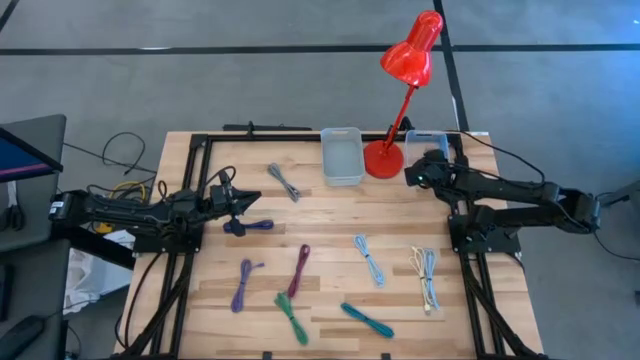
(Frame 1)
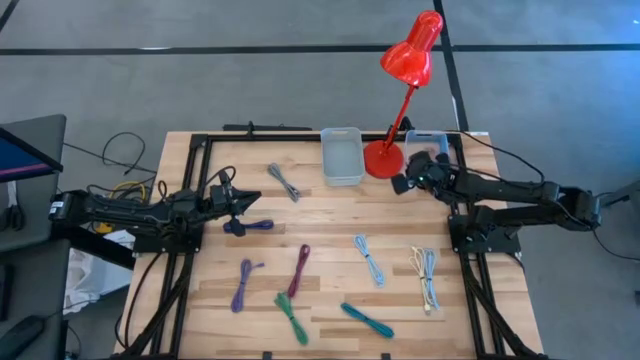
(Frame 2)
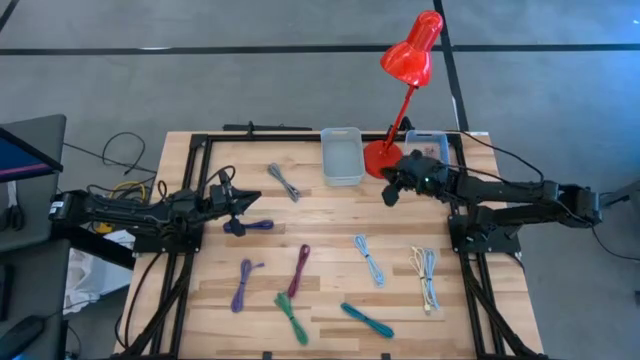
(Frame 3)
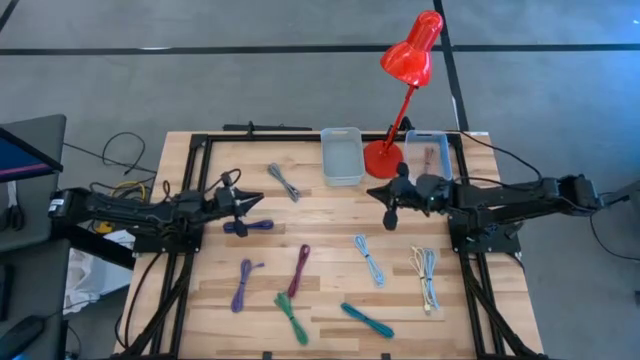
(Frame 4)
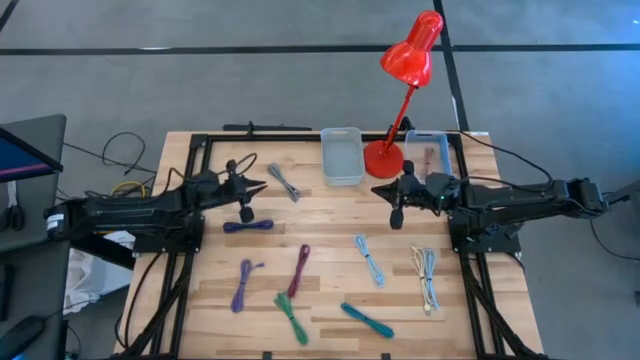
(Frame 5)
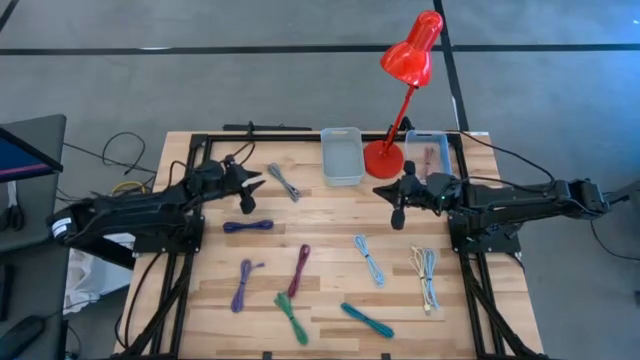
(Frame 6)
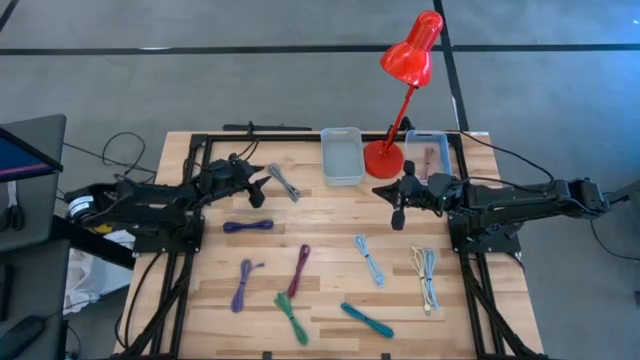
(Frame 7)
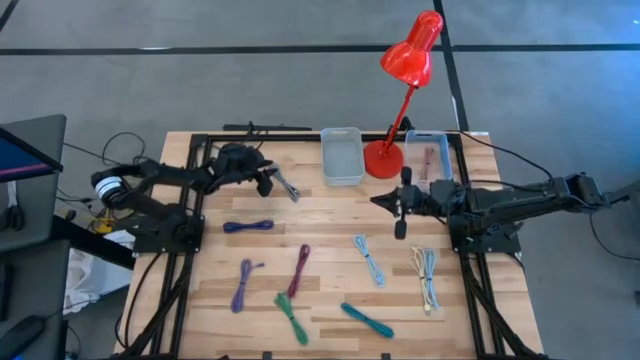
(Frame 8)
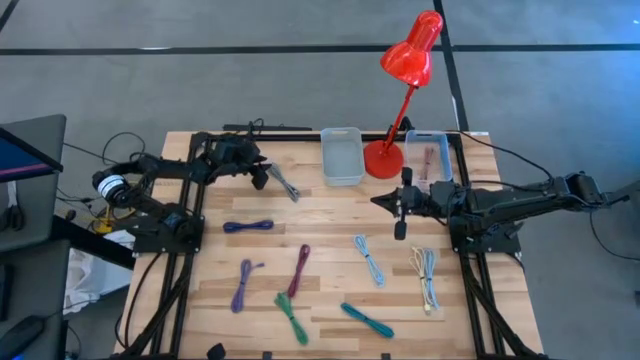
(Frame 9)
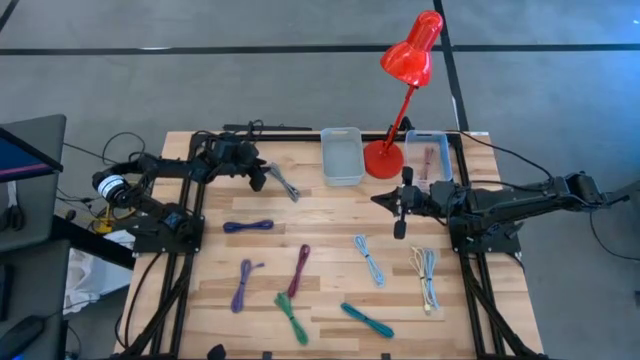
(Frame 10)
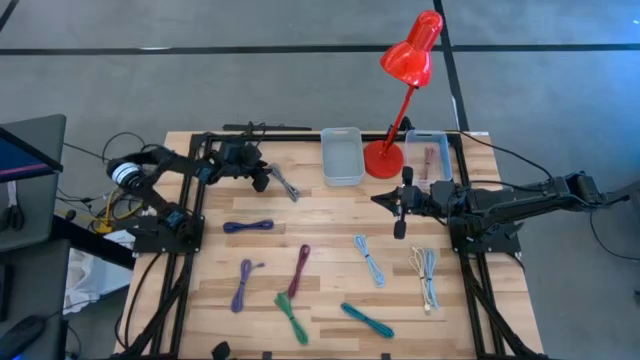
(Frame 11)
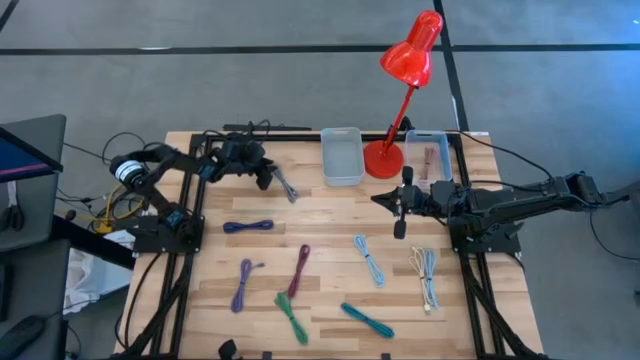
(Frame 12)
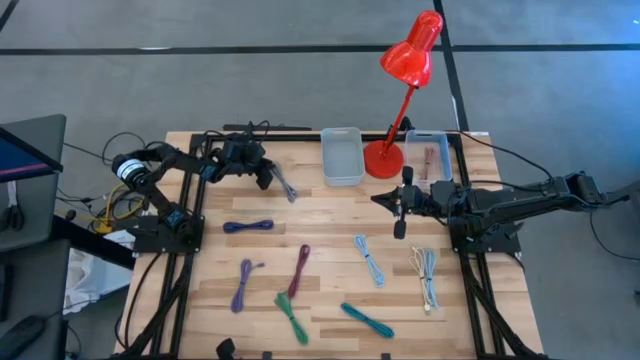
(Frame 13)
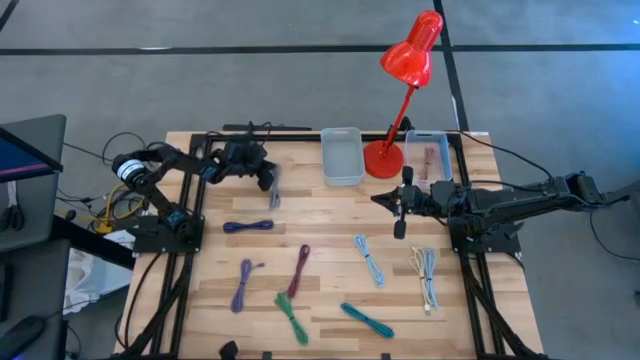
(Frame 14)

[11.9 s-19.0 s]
Task: Pick & Place USB Port
Put the white patterned charger cable into the white bin

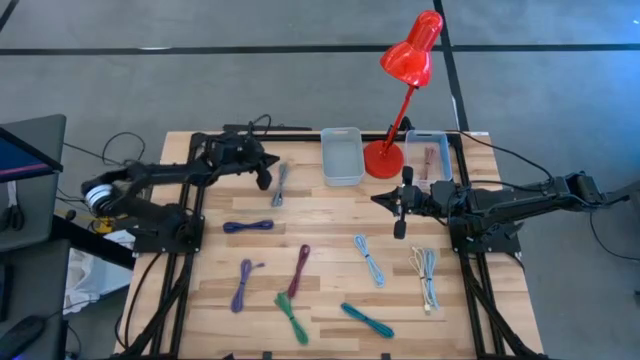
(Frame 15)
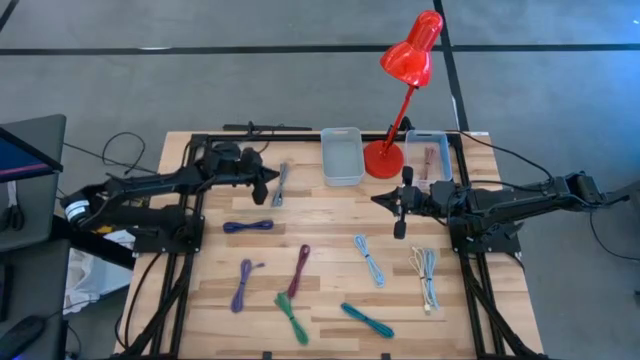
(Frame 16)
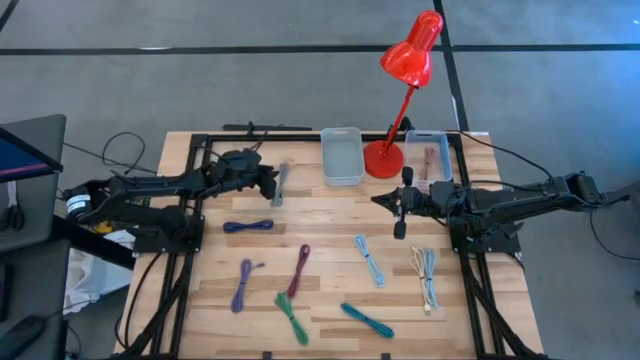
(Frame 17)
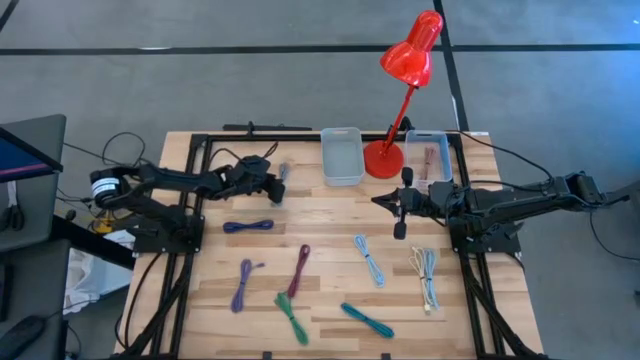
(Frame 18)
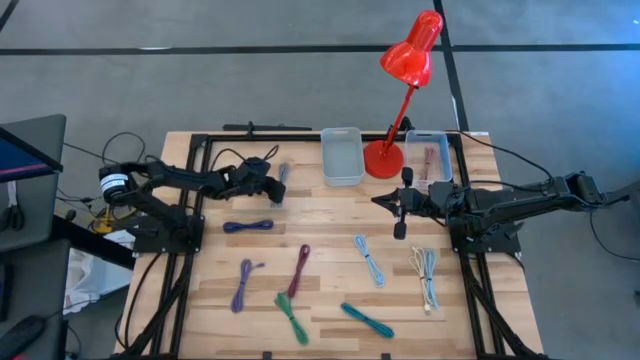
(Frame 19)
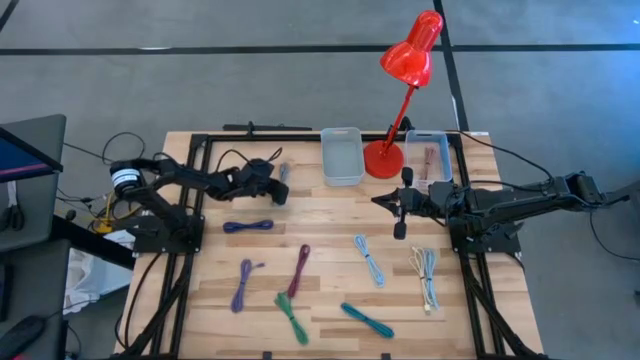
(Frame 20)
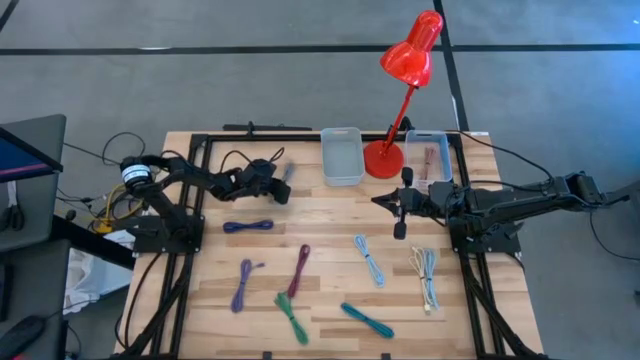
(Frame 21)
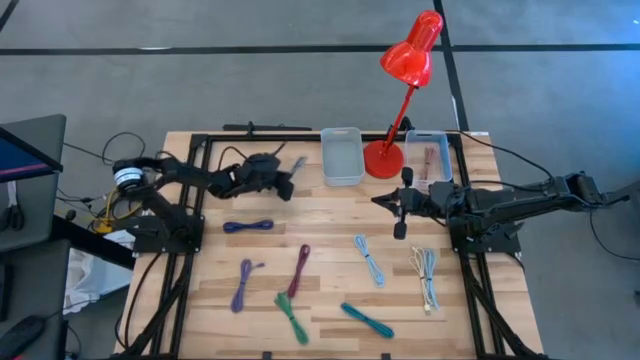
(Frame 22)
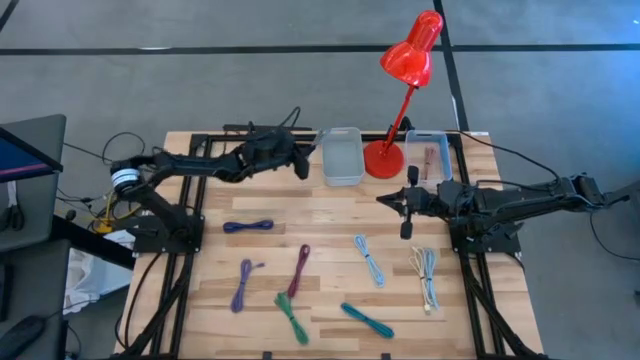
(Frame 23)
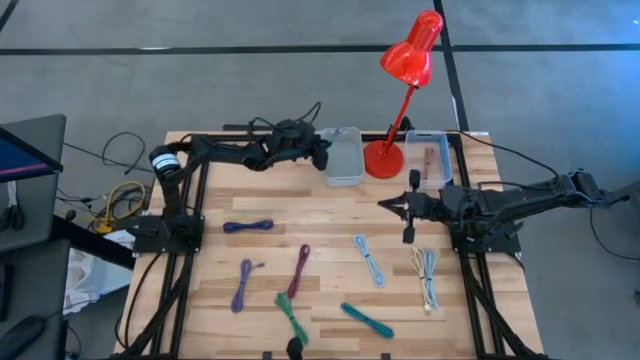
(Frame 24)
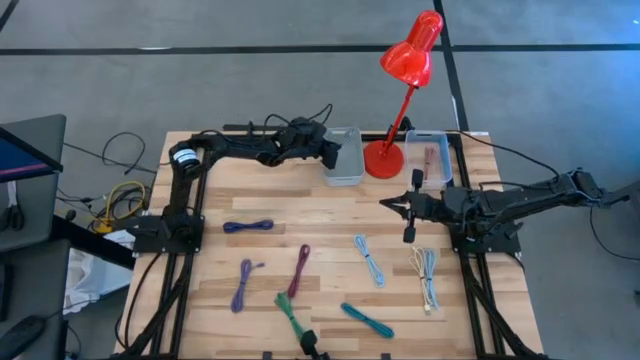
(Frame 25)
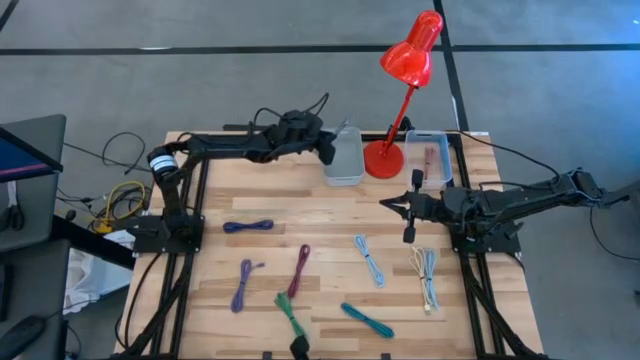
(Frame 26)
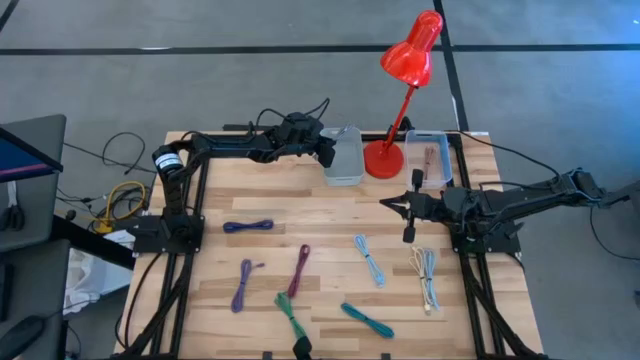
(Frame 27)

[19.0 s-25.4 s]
Put the white patterned charger cable into the white bin

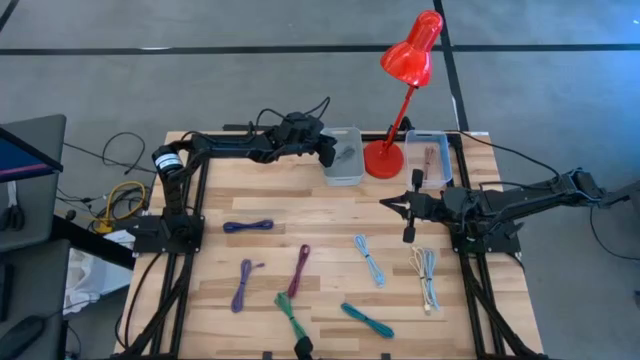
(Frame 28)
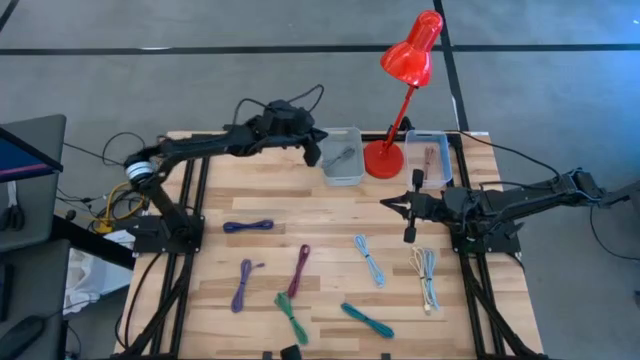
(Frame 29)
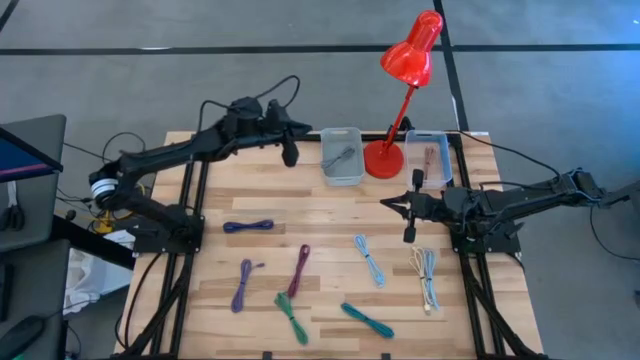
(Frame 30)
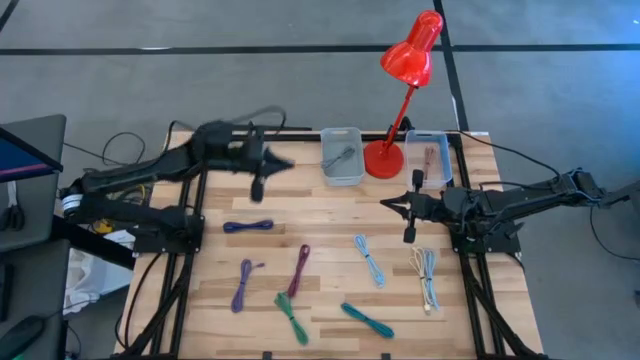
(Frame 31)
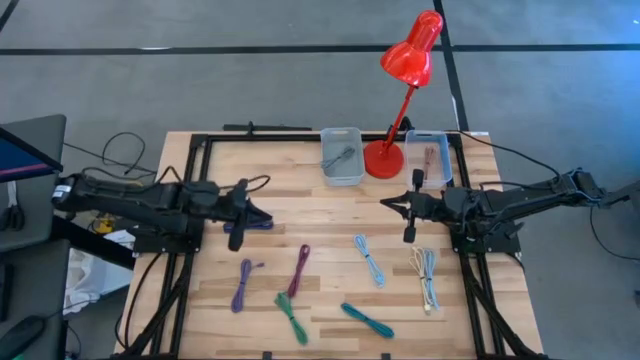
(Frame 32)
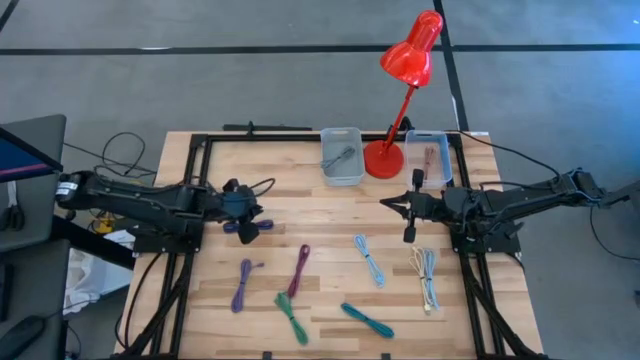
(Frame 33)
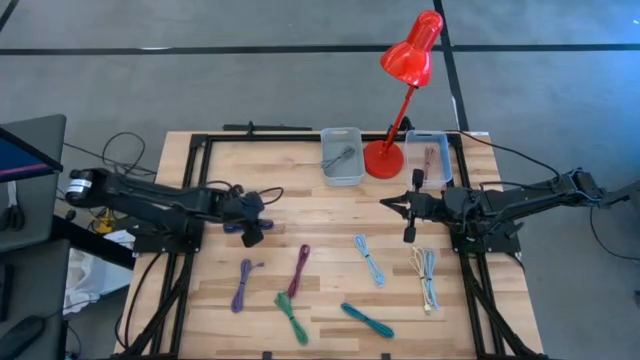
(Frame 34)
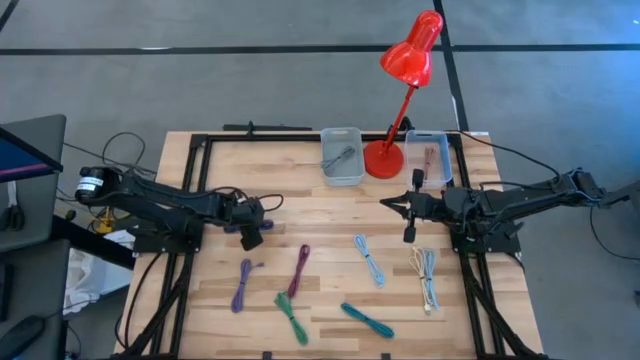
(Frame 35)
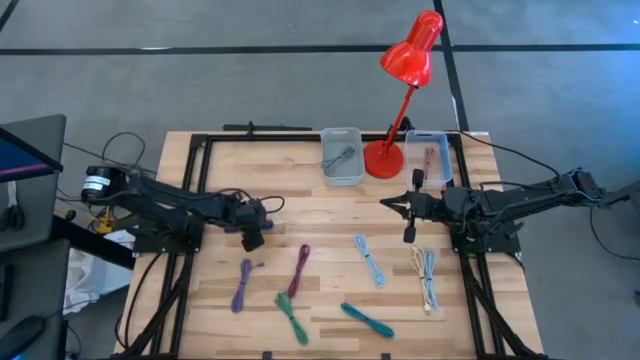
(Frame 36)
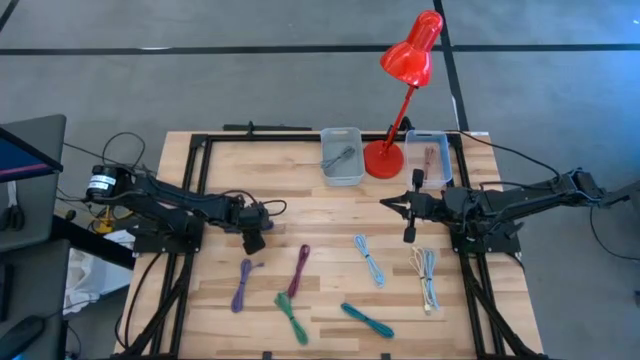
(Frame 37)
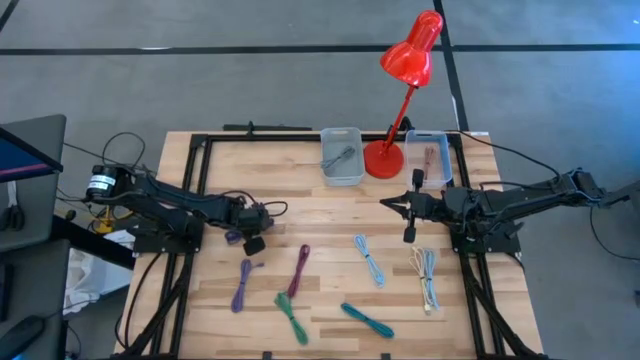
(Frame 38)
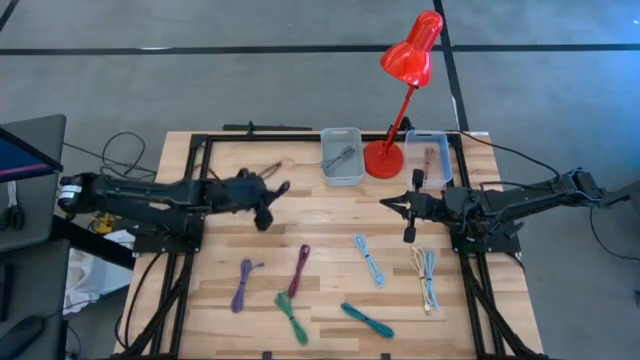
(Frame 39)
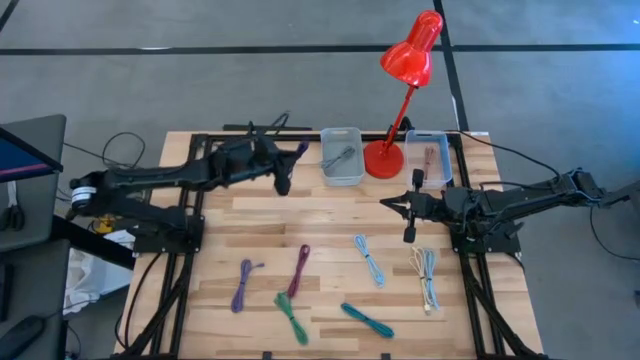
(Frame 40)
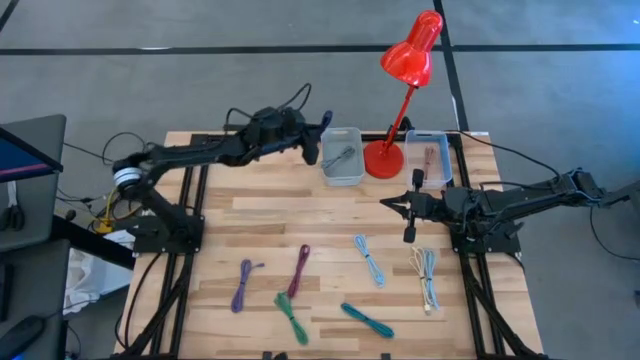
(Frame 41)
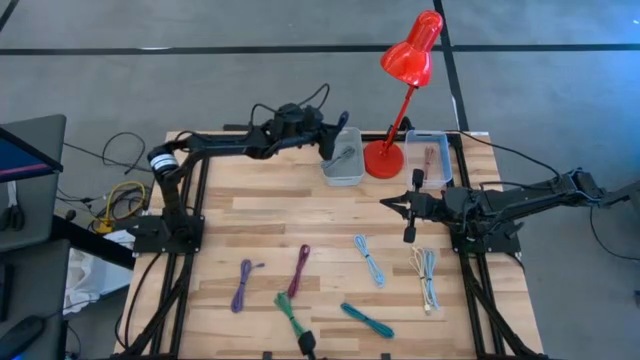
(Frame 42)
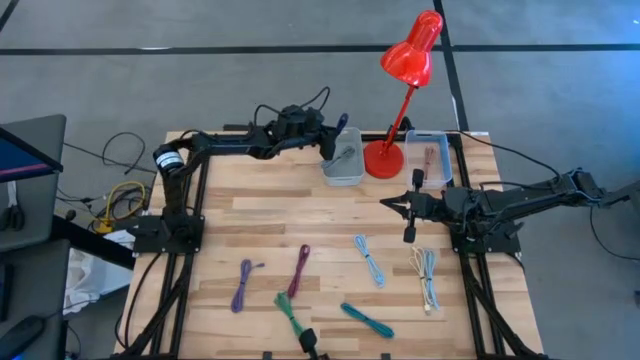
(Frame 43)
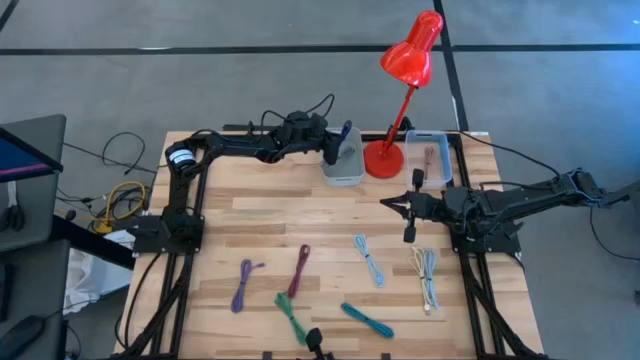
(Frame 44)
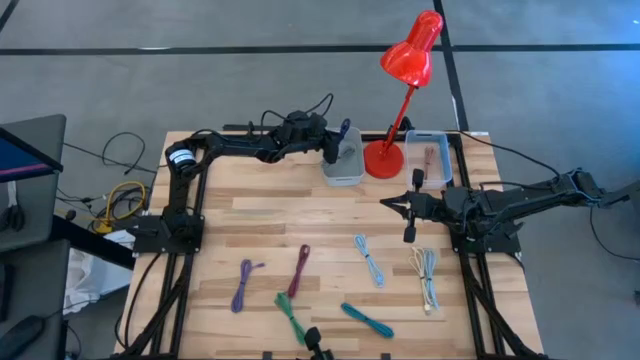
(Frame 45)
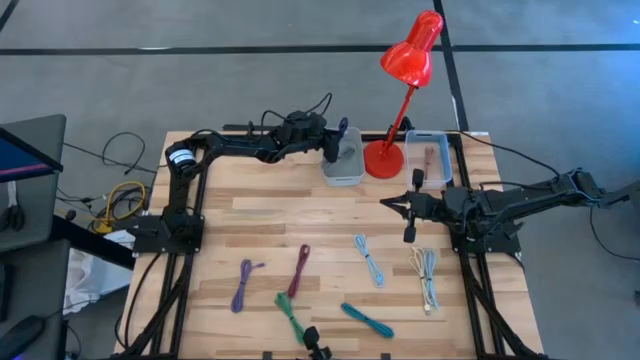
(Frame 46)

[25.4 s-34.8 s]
Put the purple patterned charger cable into the white bin
